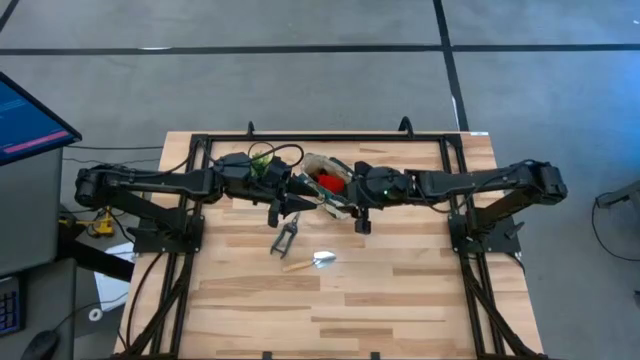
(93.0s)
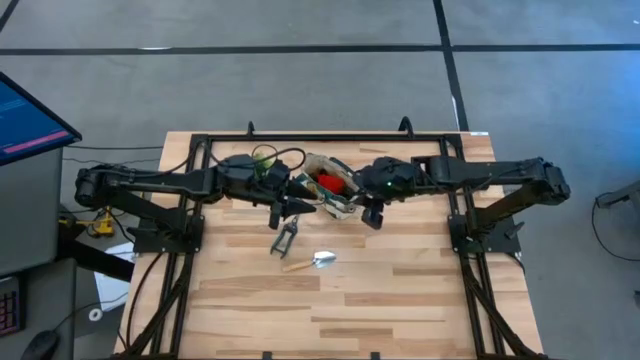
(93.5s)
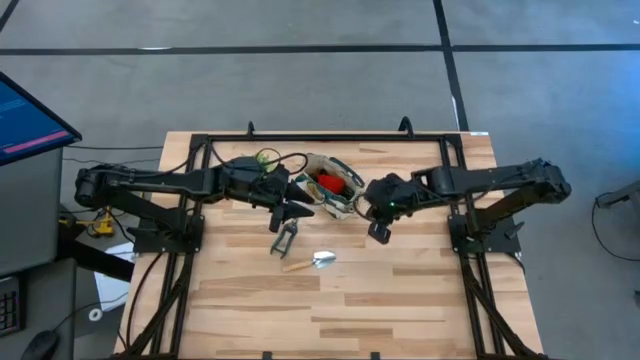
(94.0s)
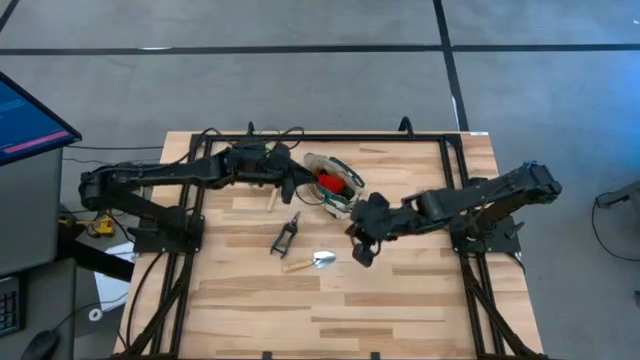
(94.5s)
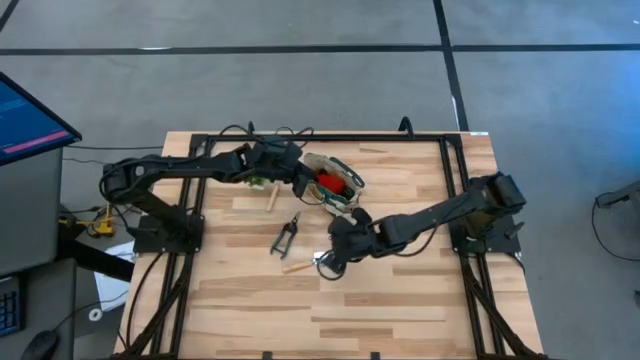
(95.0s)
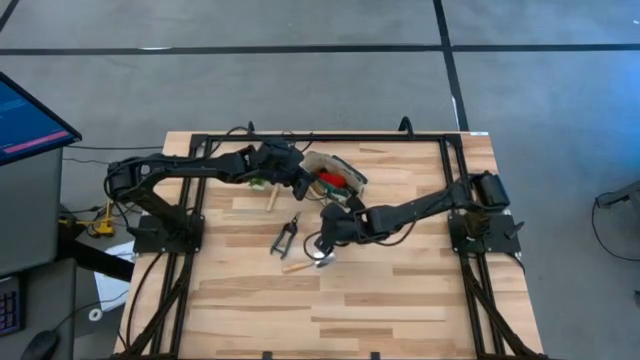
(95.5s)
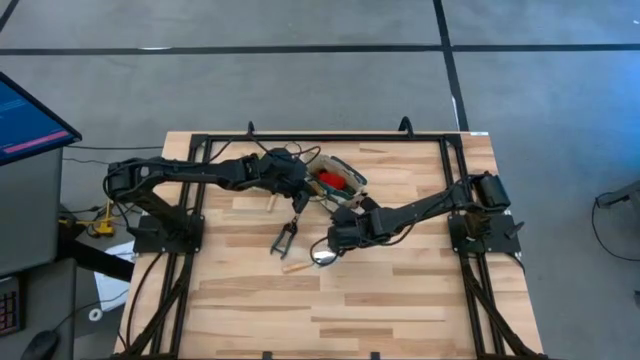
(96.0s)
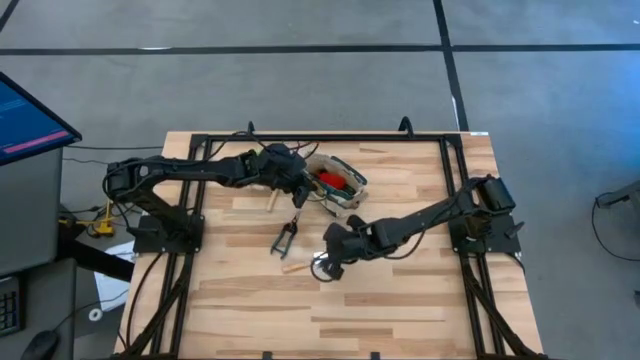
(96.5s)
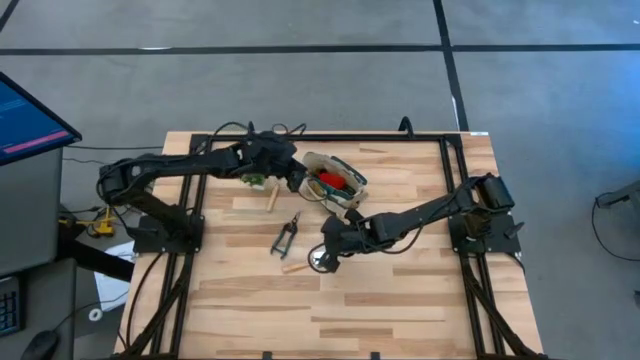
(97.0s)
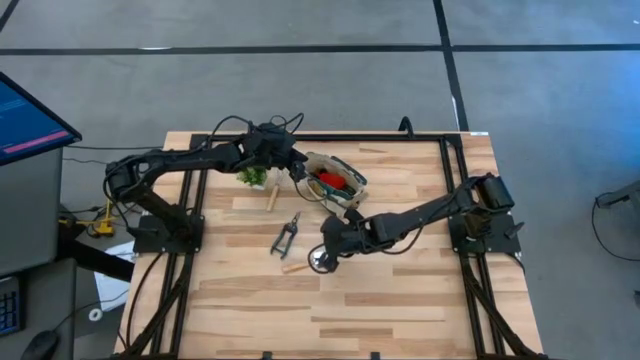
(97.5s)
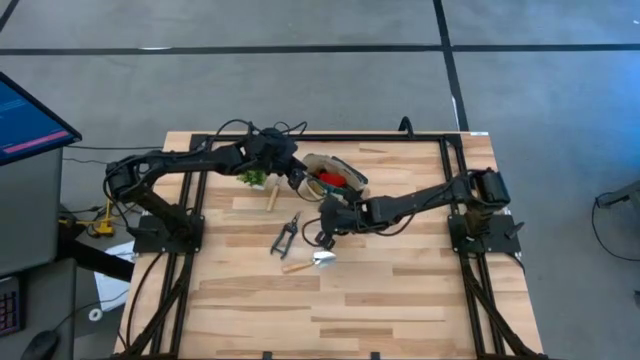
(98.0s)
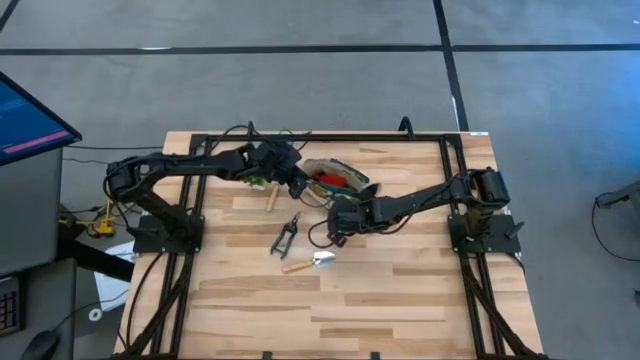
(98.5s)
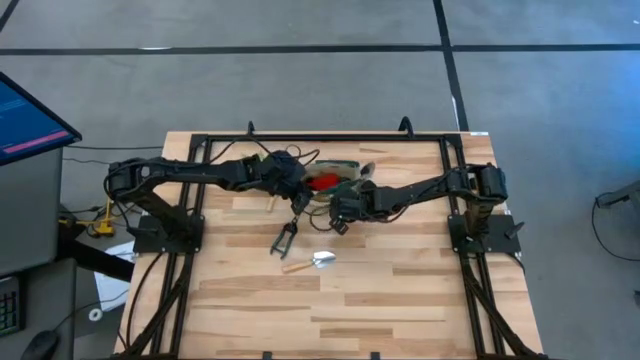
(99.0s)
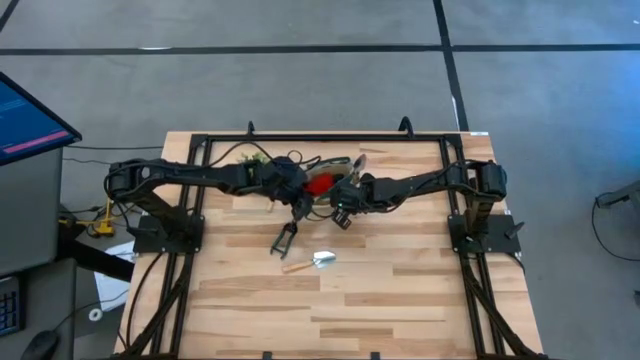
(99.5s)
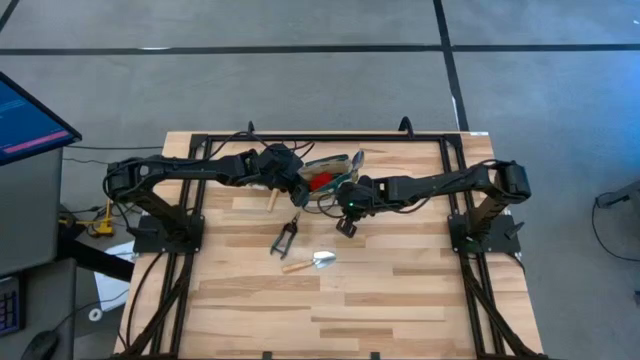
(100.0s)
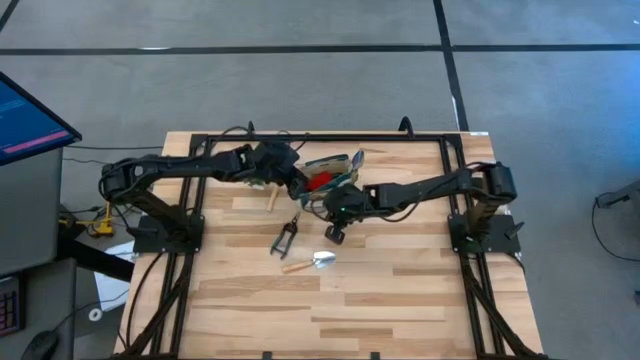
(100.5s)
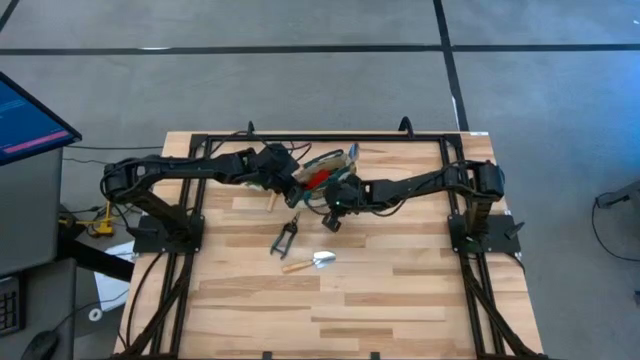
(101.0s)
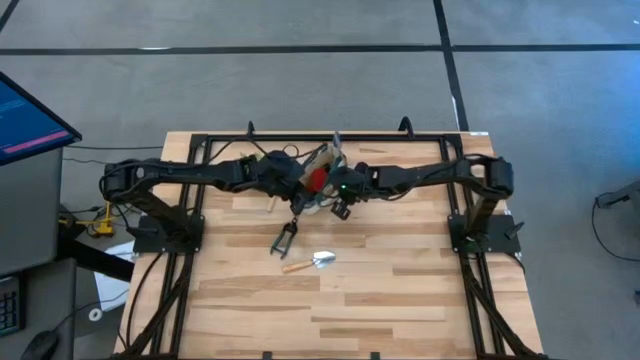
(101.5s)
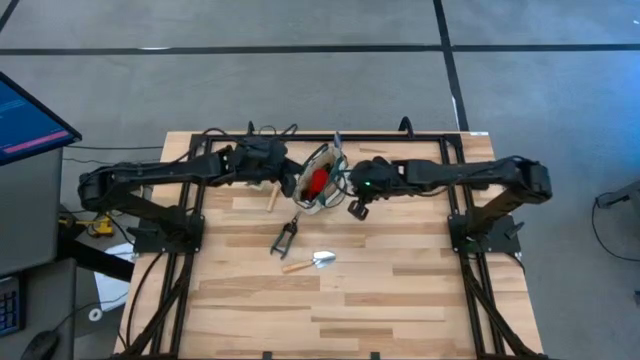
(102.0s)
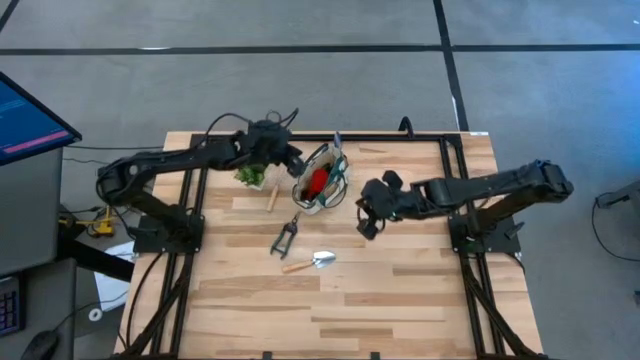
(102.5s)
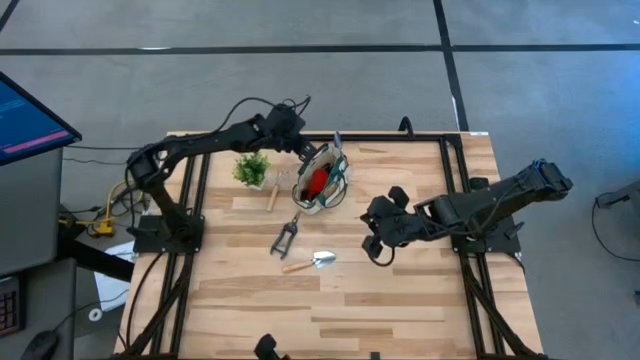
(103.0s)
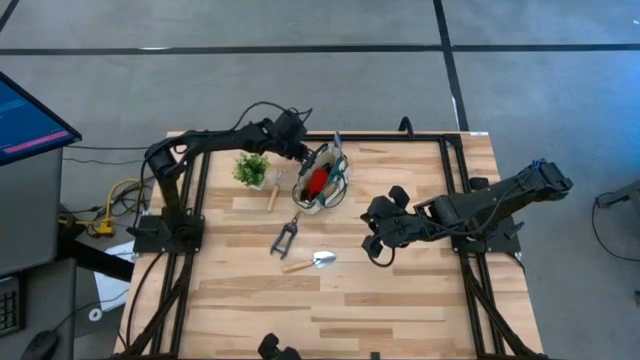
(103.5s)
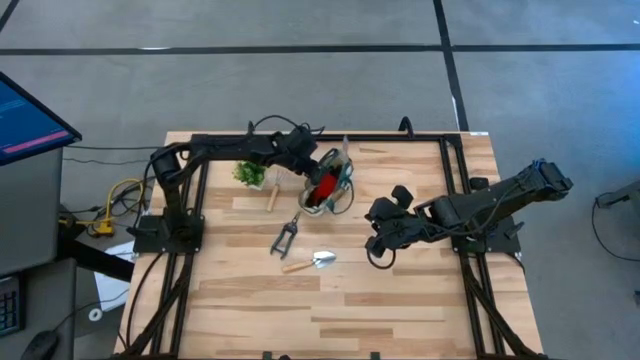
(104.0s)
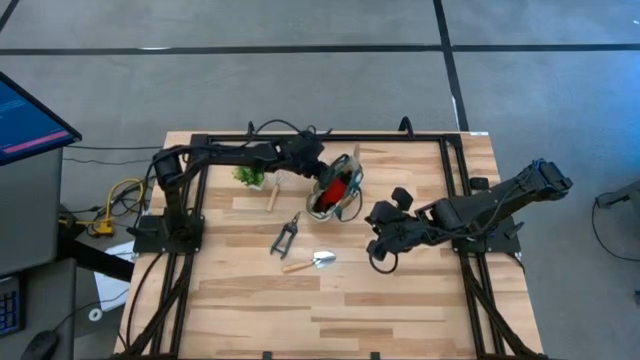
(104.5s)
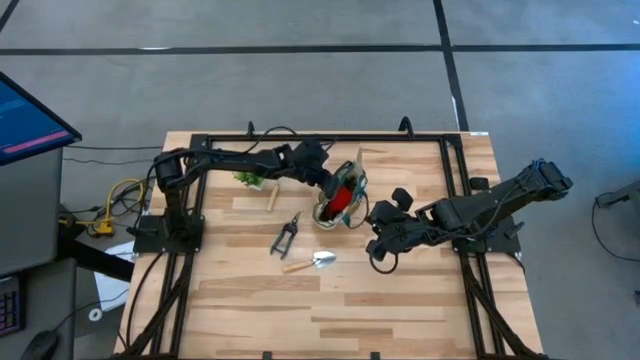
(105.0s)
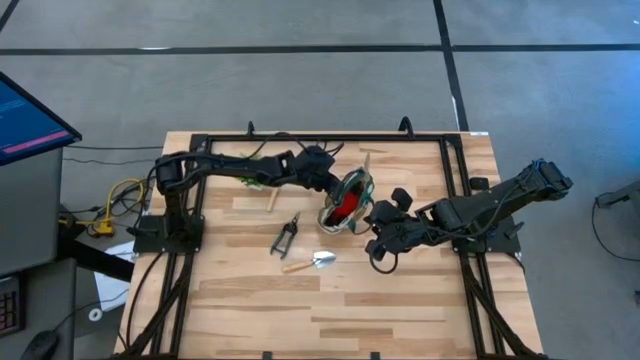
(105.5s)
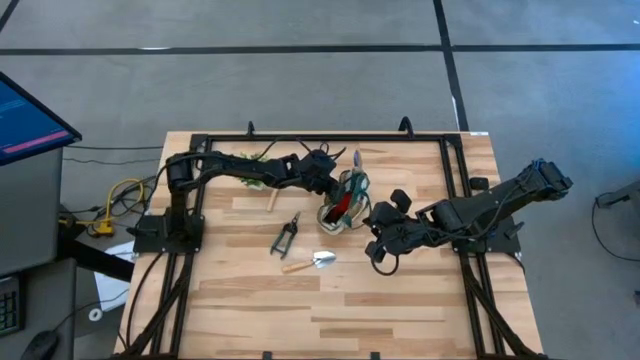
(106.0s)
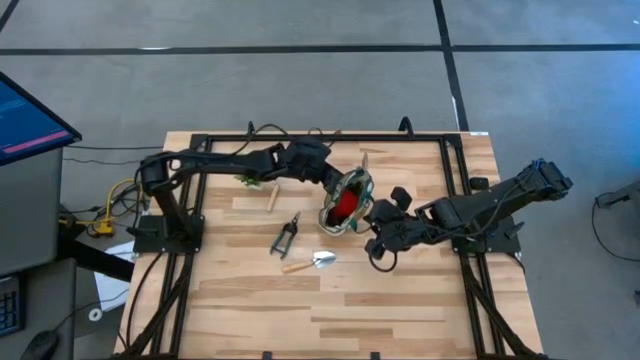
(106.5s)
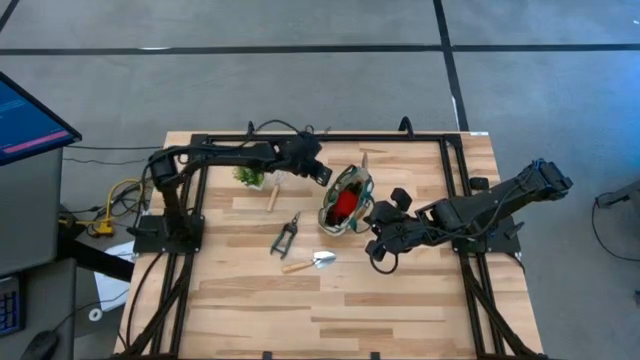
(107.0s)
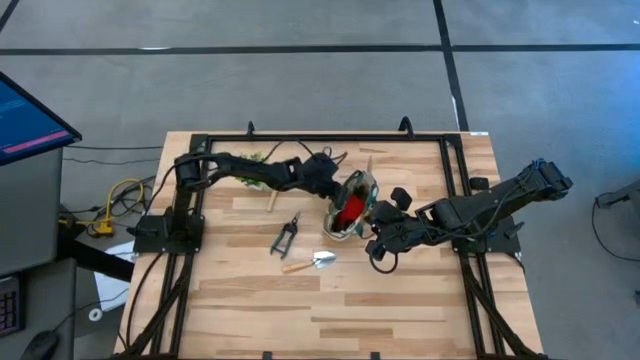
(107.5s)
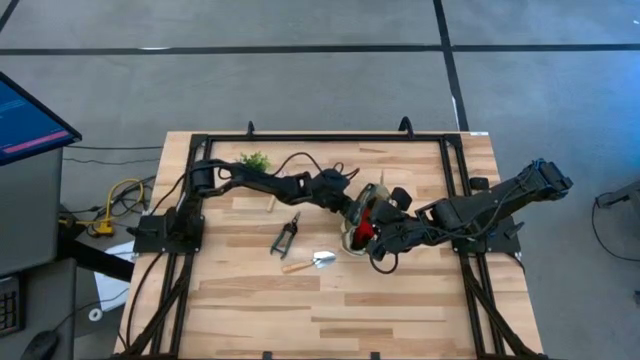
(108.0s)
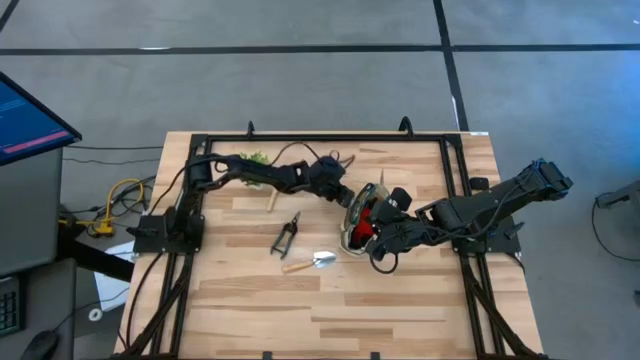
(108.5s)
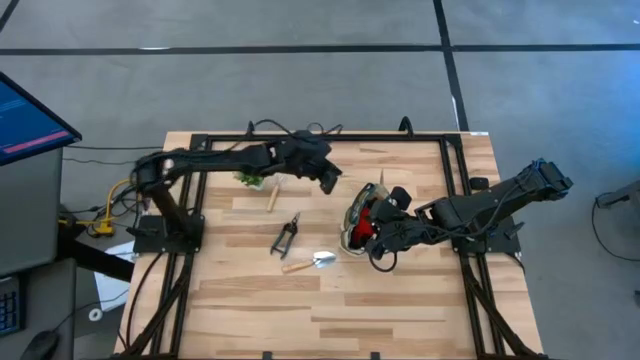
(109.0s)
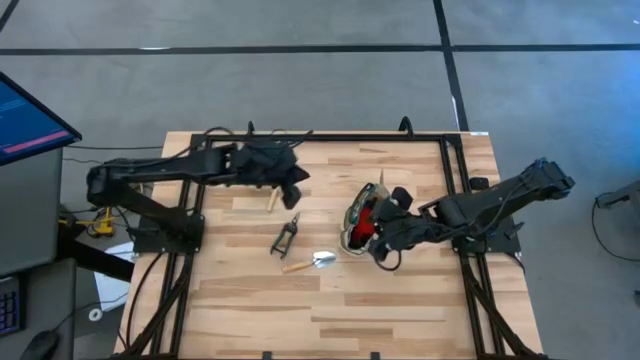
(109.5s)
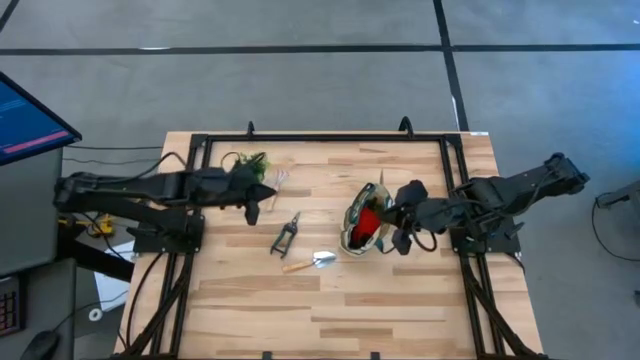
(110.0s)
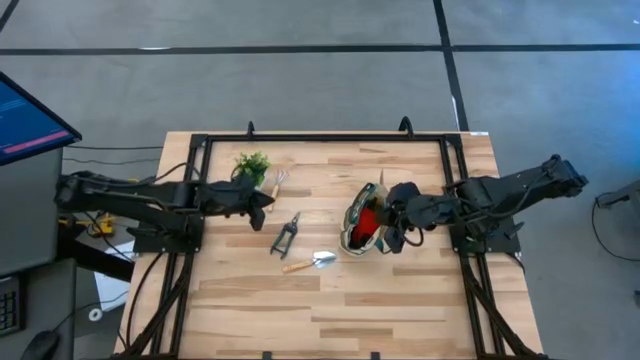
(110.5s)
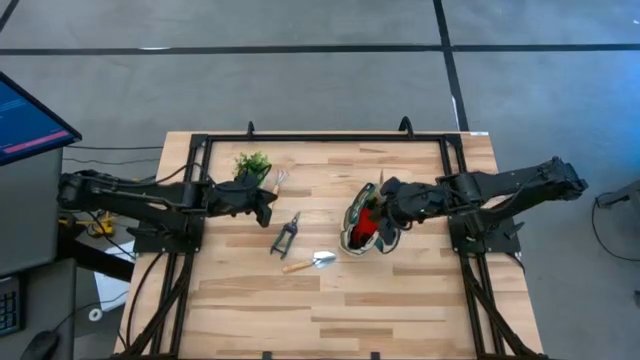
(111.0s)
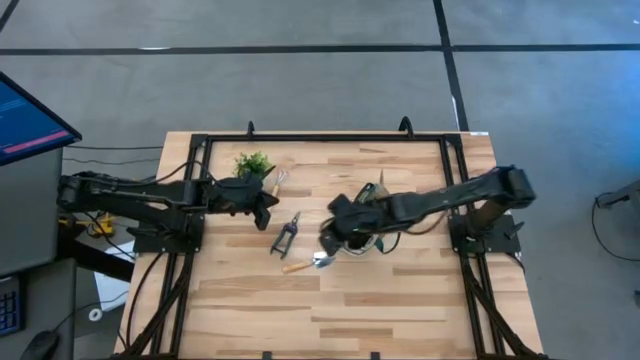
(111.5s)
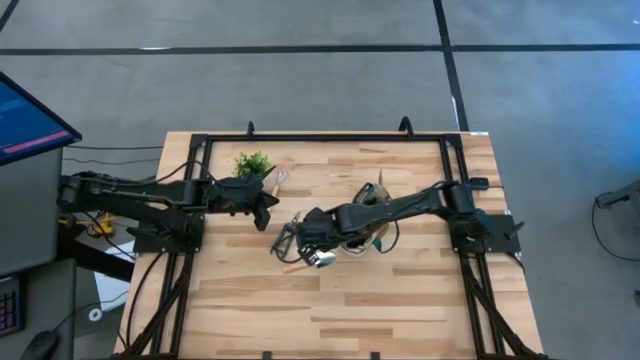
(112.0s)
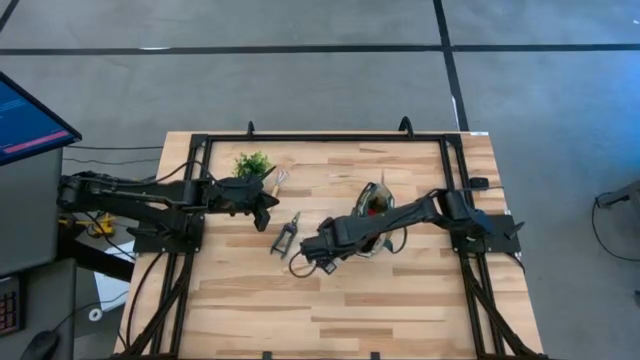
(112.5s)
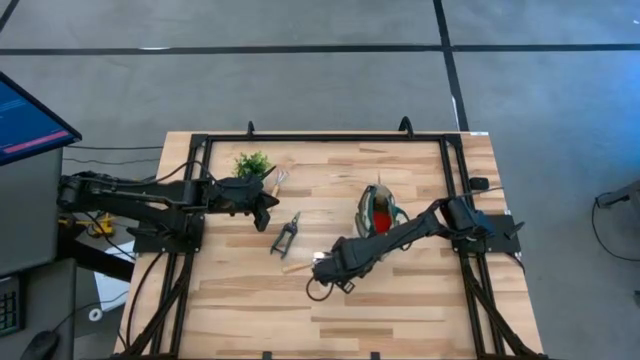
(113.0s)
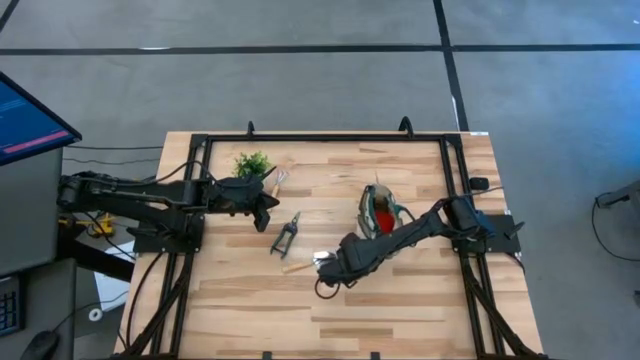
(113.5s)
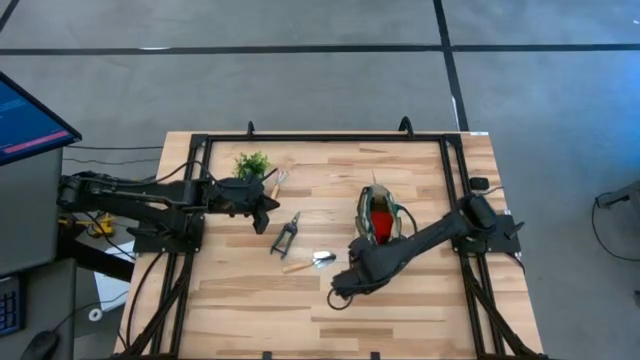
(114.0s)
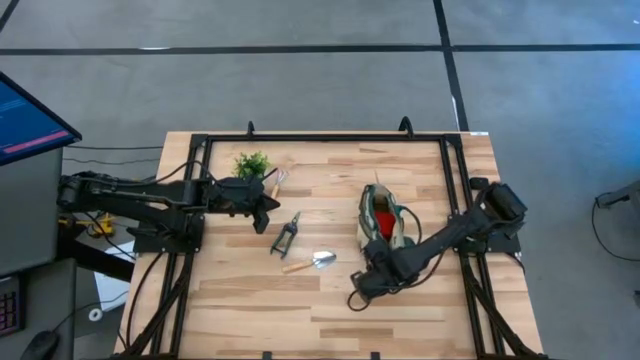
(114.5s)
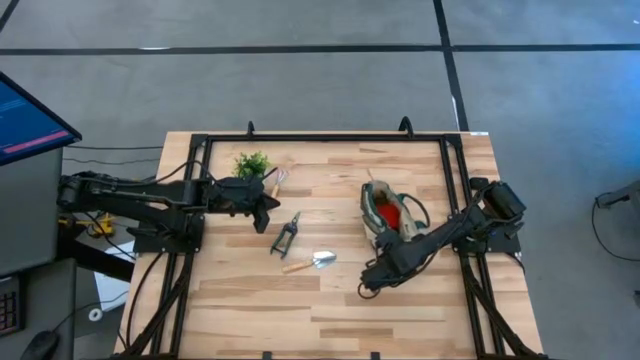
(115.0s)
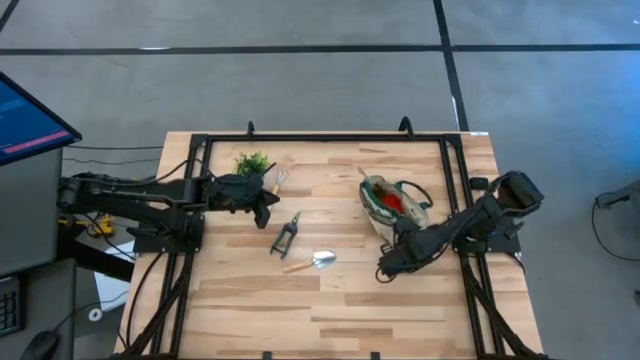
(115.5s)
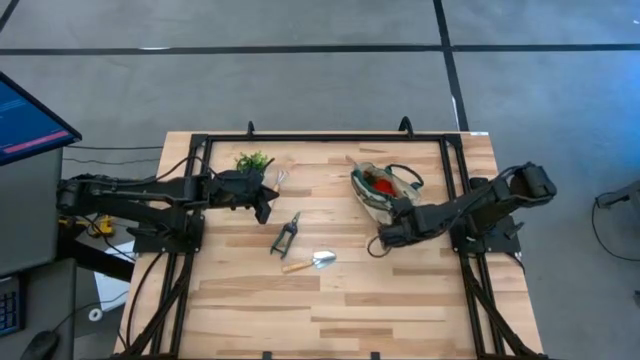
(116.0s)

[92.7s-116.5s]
Task: Pick & Place Garden tools in Gardening bag
Adjust the gardening bag
